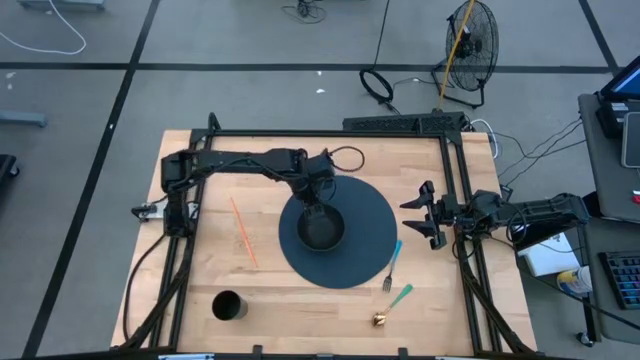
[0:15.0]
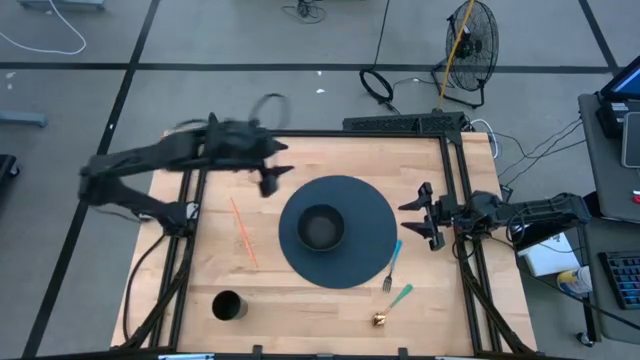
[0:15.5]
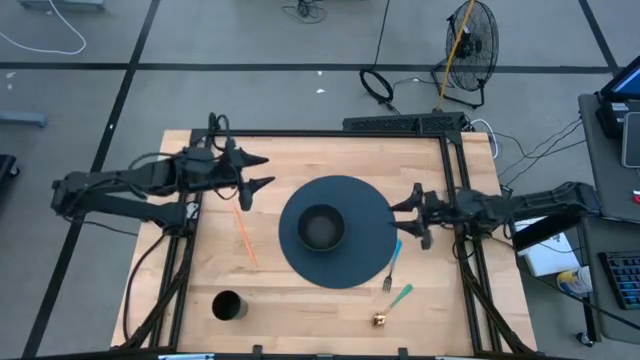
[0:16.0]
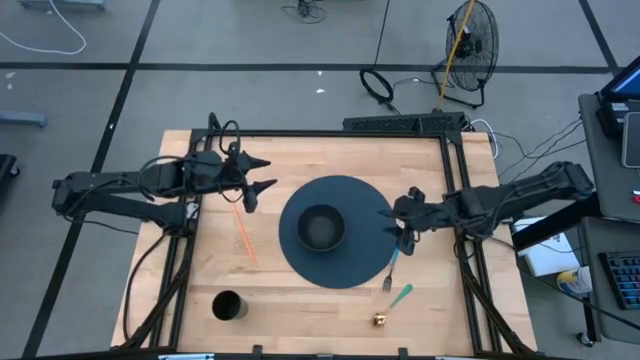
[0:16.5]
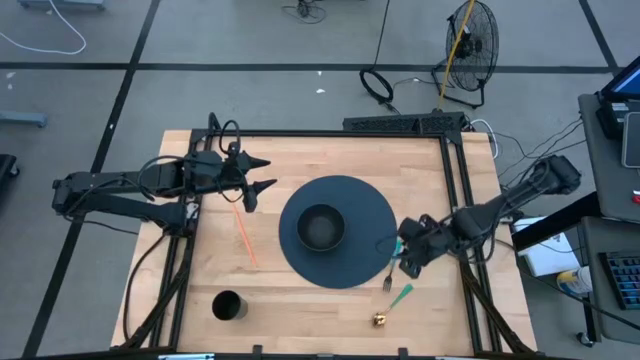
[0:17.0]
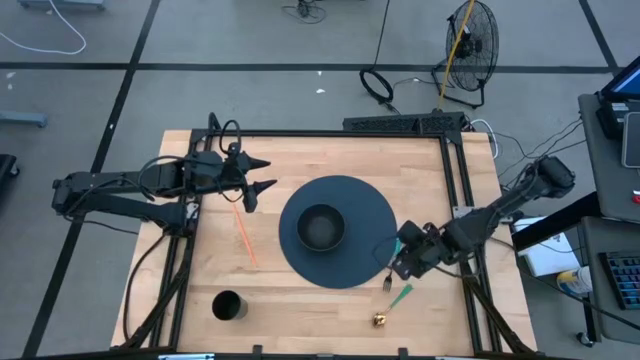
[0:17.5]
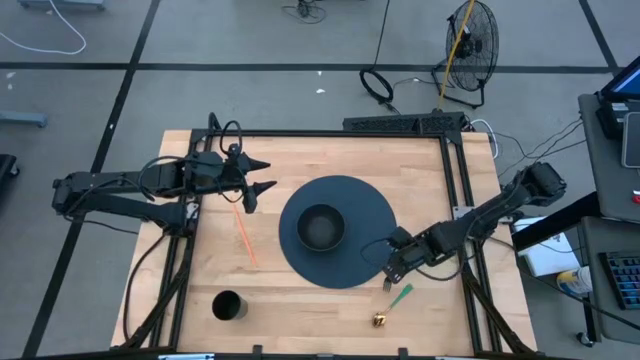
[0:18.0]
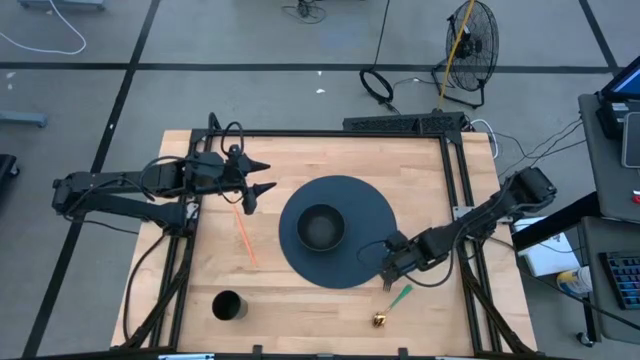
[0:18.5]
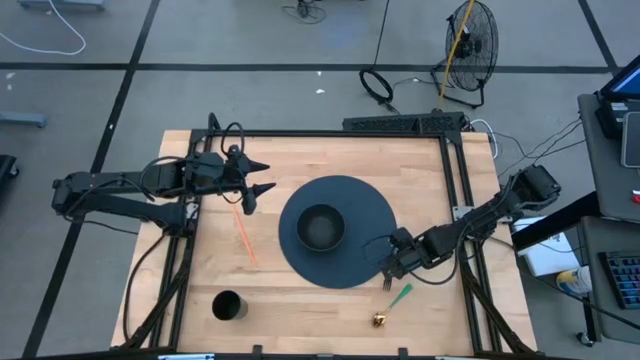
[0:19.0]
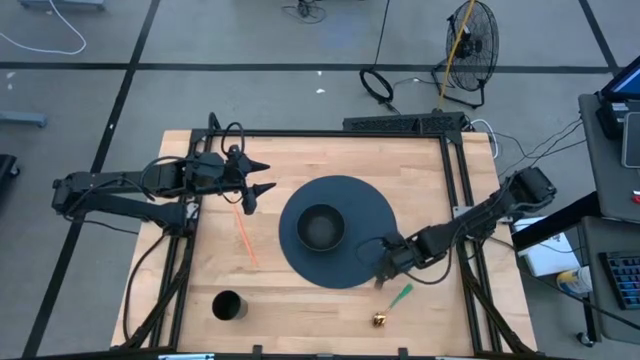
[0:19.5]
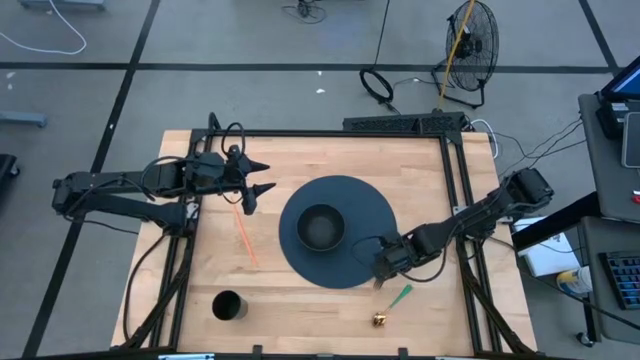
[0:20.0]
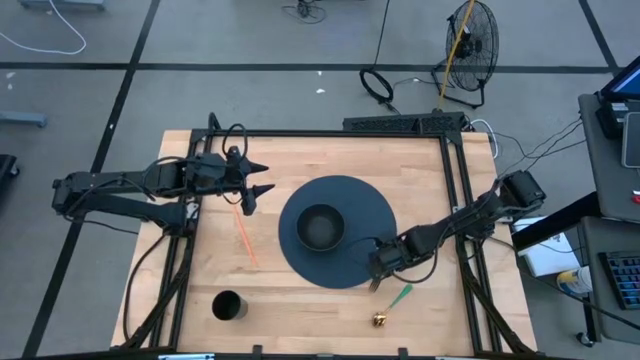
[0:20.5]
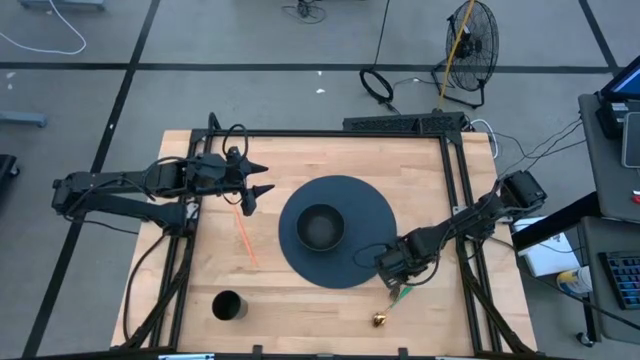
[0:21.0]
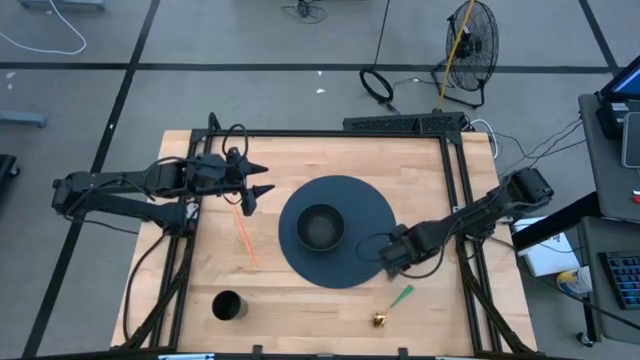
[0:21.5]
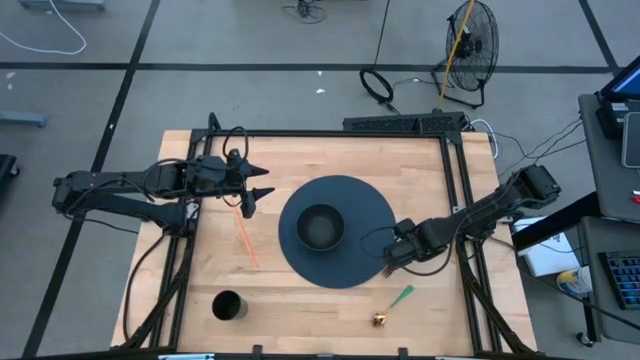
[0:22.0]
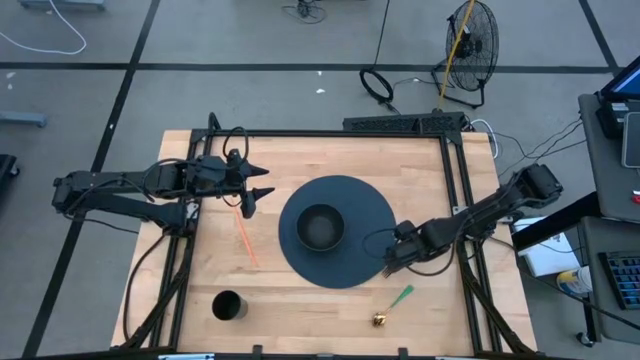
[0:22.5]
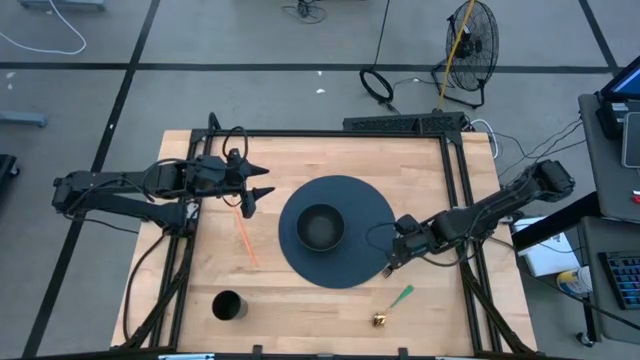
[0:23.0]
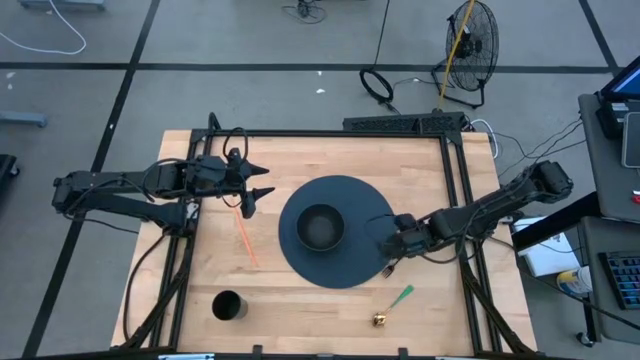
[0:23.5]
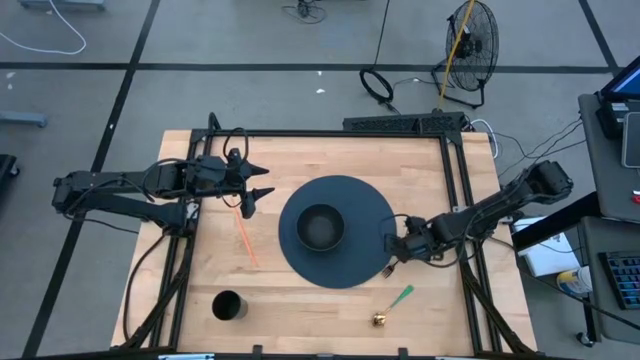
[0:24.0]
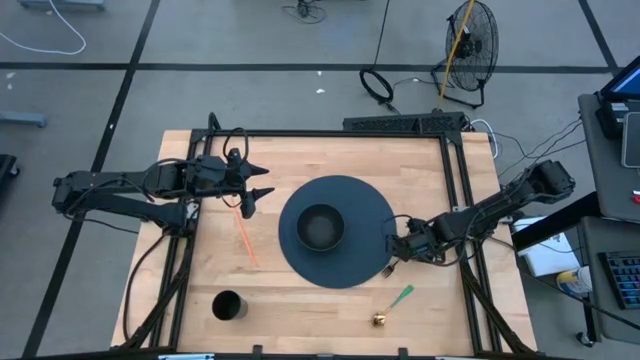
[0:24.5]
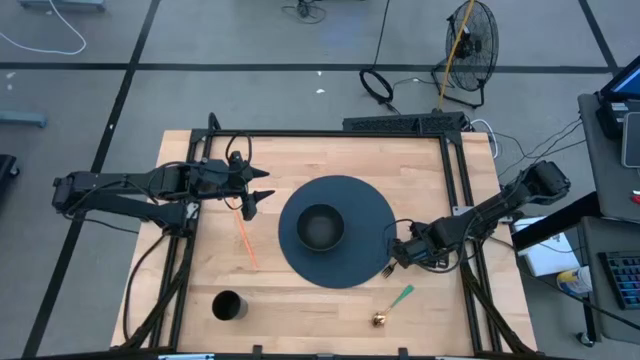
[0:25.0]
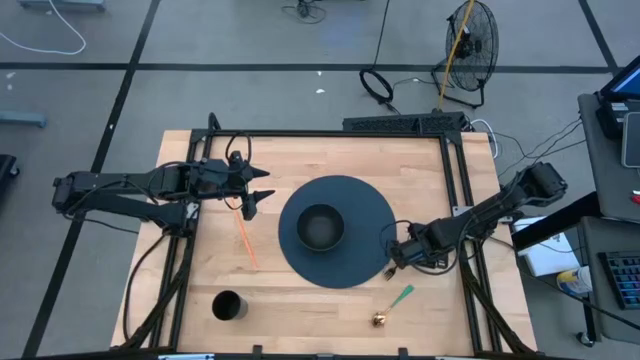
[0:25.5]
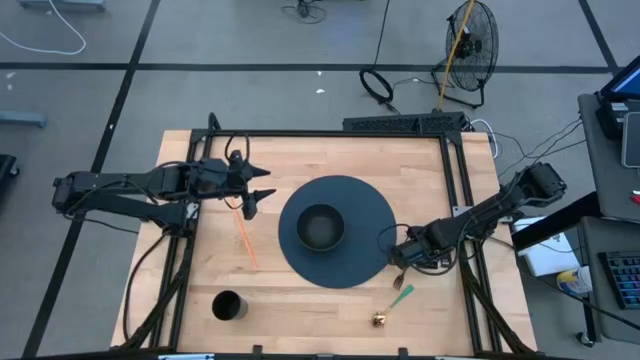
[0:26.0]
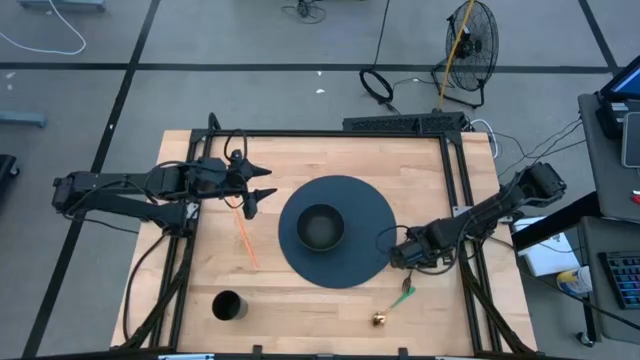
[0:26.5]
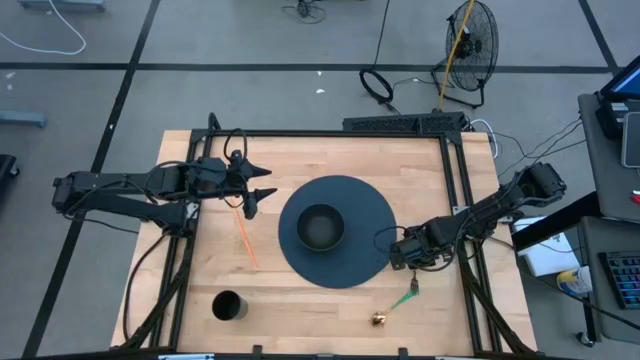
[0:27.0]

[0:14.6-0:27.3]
Task: Pick & Place Utensil
Put the blue fork into the black bowl on the blue table placemat

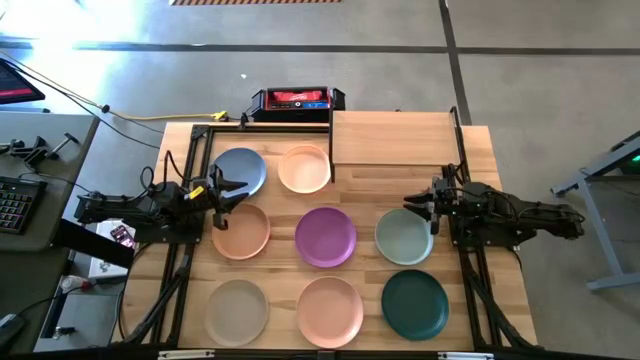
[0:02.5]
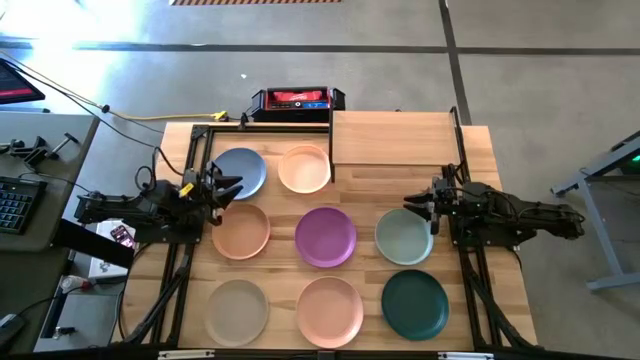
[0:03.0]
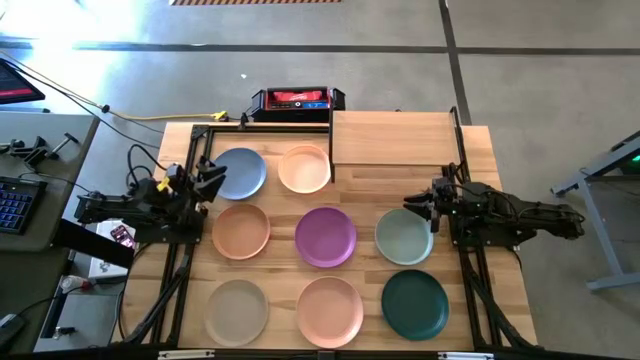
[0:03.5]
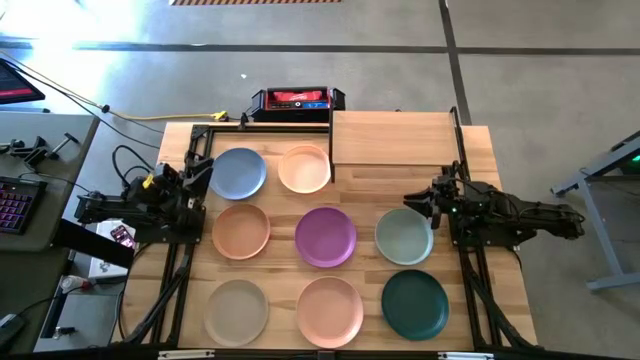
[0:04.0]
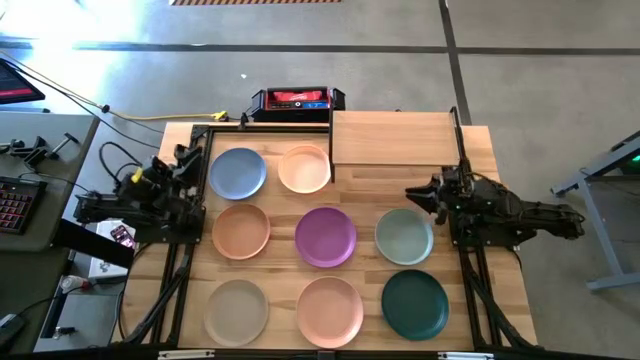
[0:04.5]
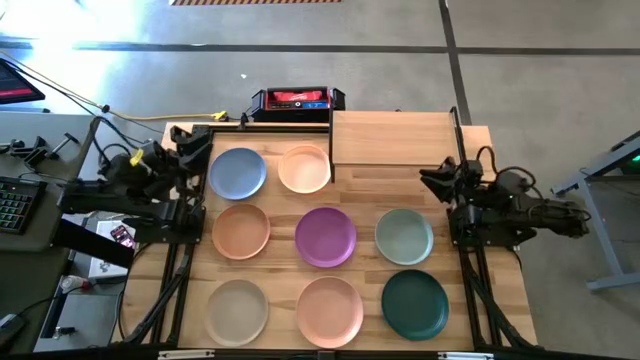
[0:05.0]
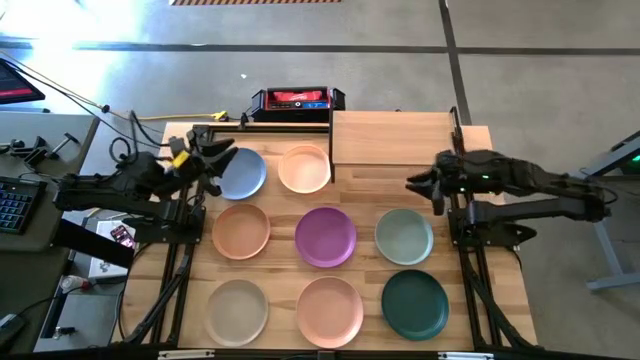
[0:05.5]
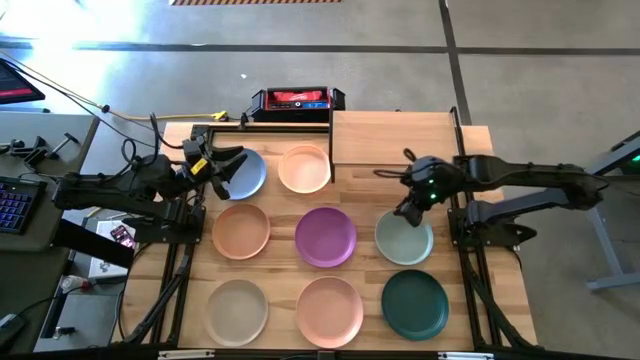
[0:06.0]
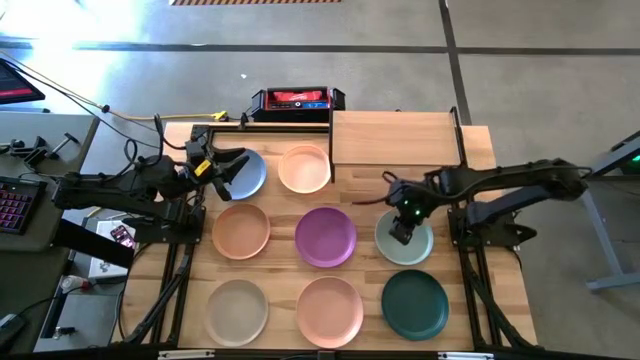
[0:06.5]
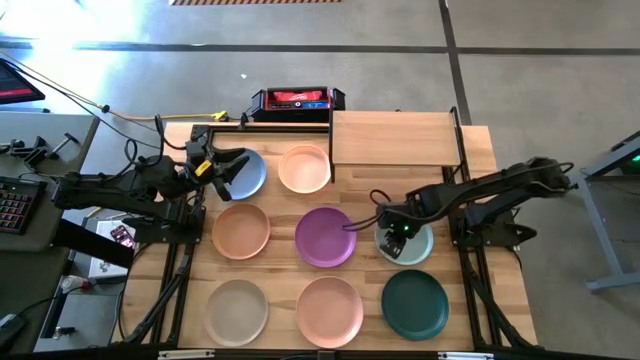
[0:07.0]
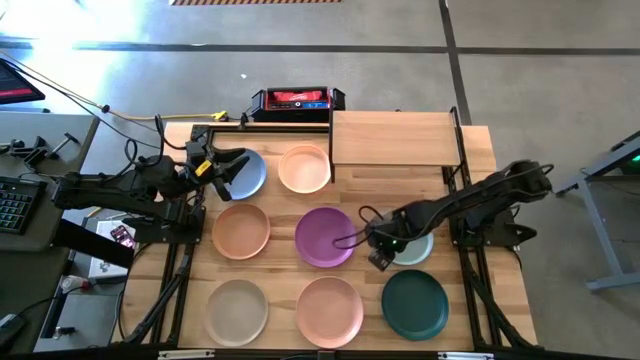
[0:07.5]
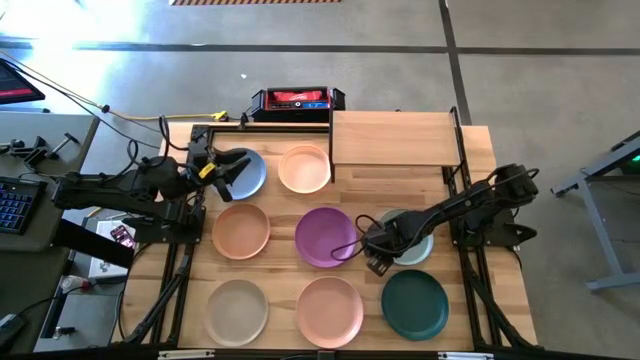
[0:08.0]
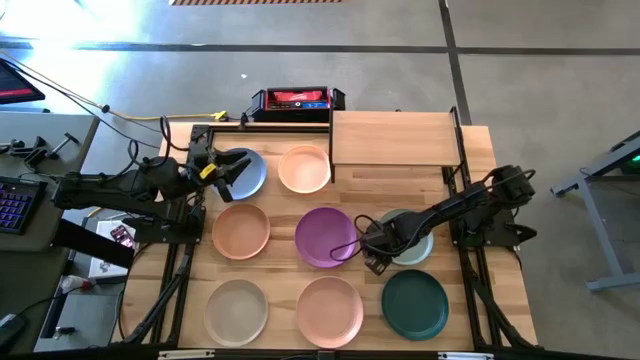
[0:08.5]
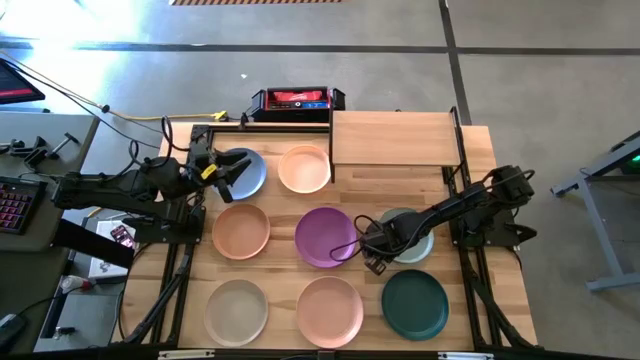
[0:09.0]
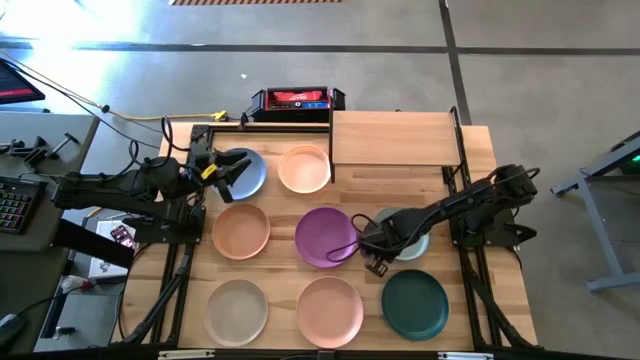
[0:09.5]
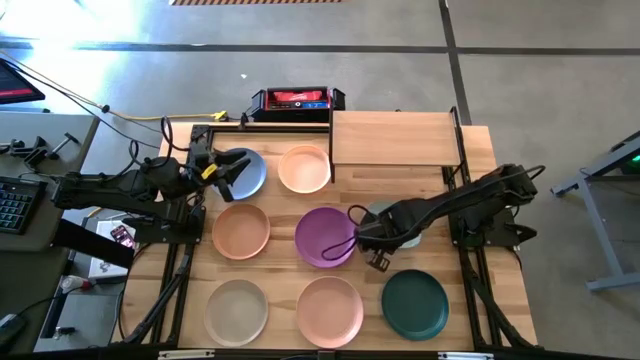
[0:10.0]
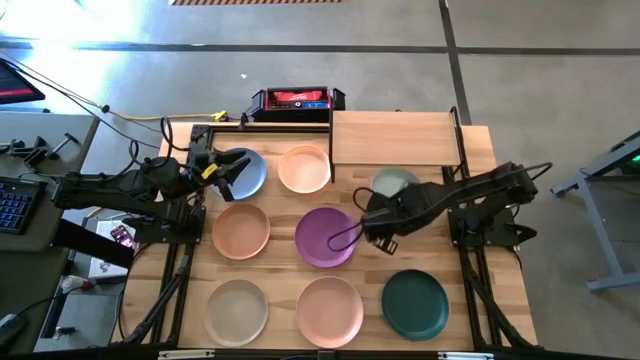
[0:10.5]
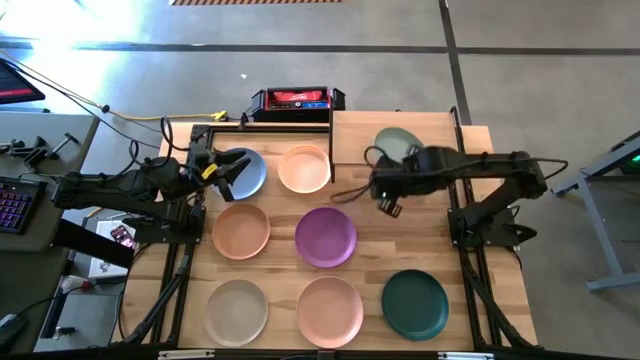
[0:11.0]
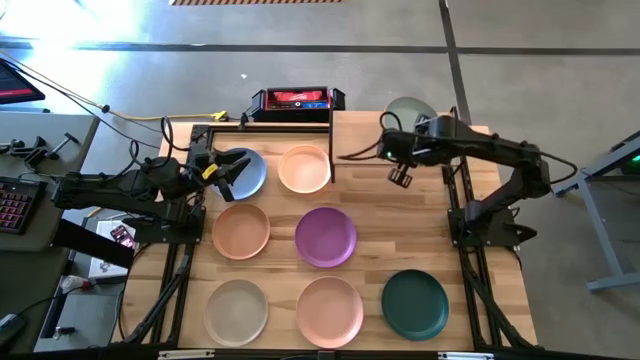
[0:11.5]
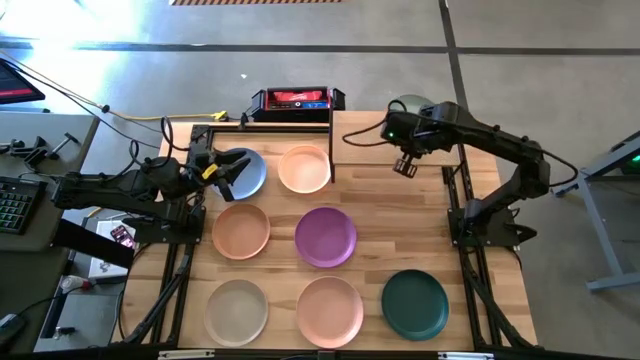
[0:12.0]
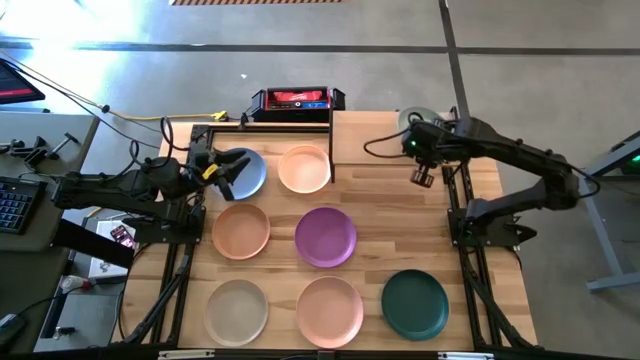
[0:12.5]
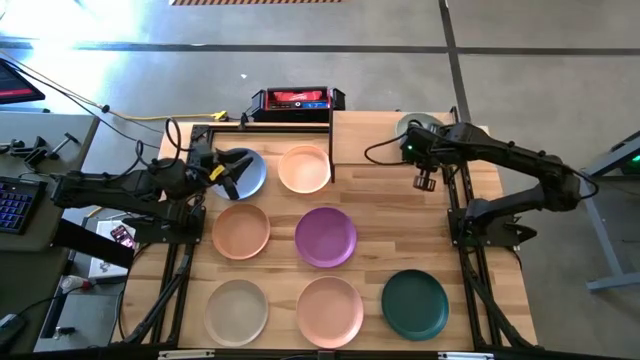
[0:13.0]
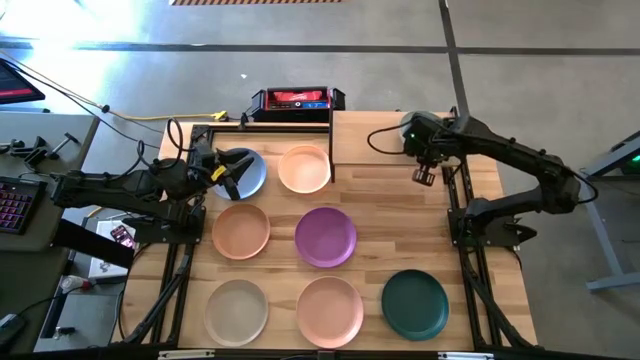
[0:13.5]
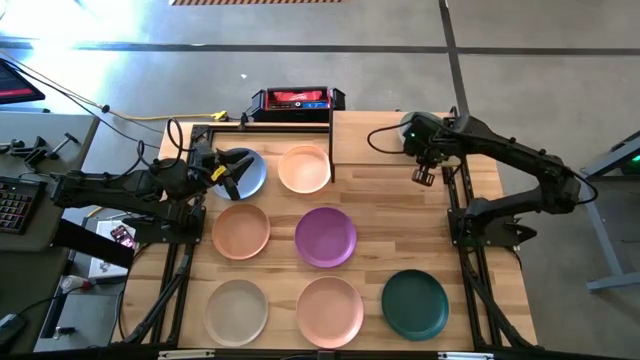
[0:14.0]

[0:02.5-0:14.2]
Task: Place and stack plates onto a shelf
Put the light blue plate on the shelf
